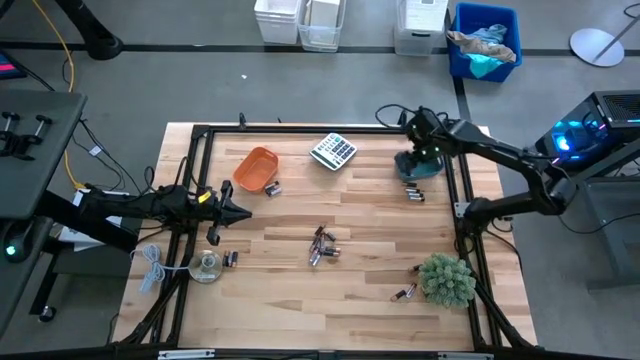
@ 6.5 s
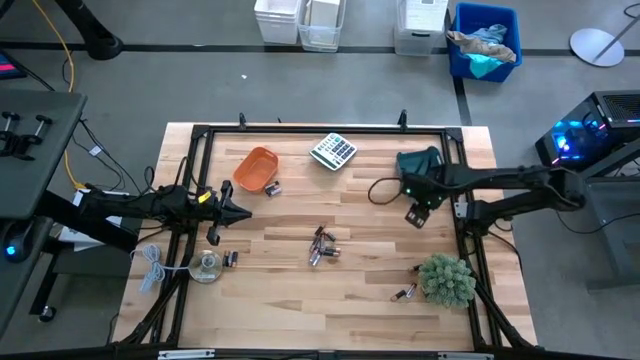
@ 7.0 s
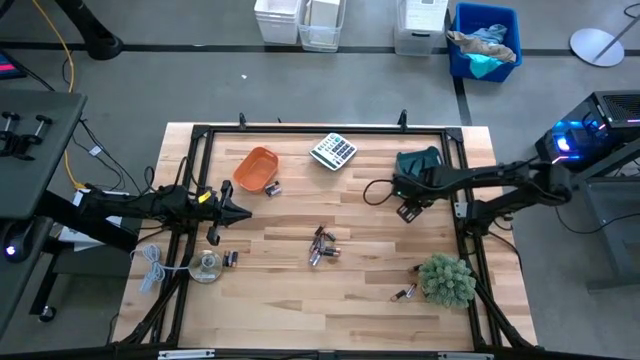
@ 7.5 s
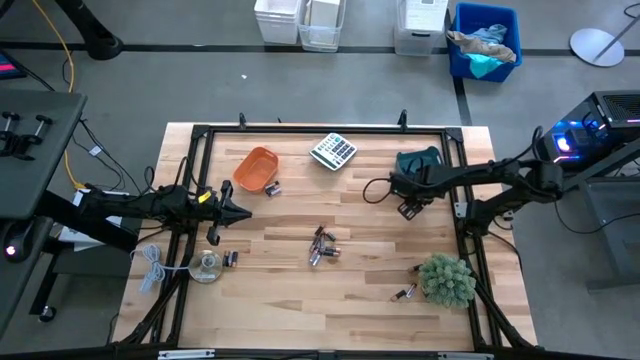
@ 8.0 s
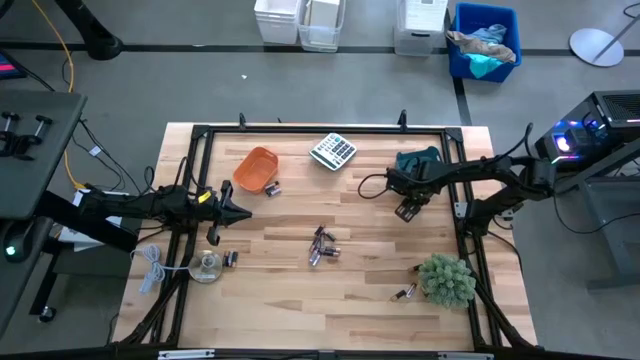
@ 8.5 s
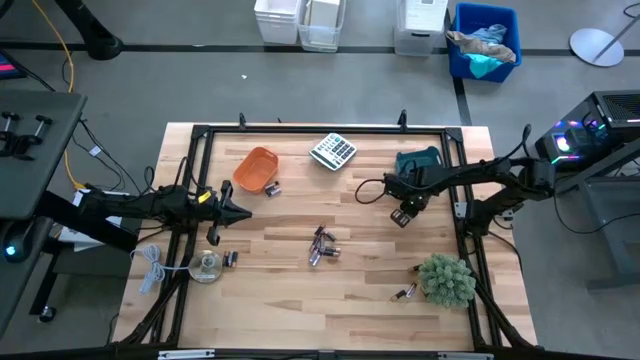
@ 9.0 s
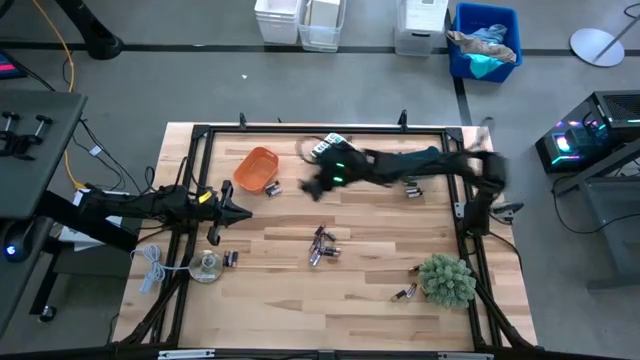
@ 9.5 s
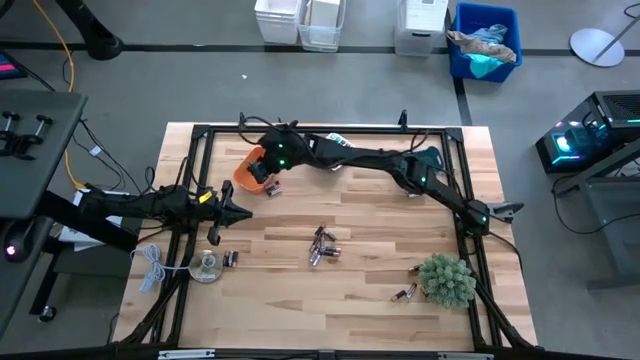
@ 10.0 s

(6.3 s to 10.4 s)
Task: Sort batteries
Put the silver battery into the orange bin

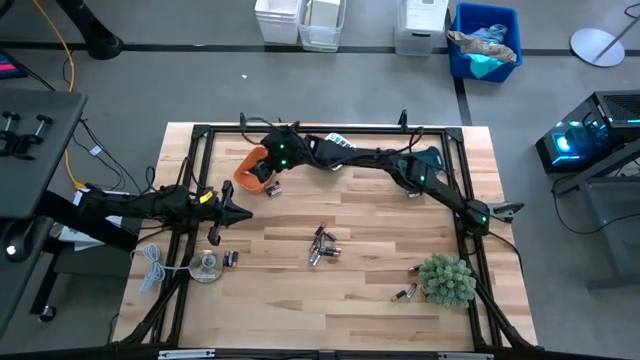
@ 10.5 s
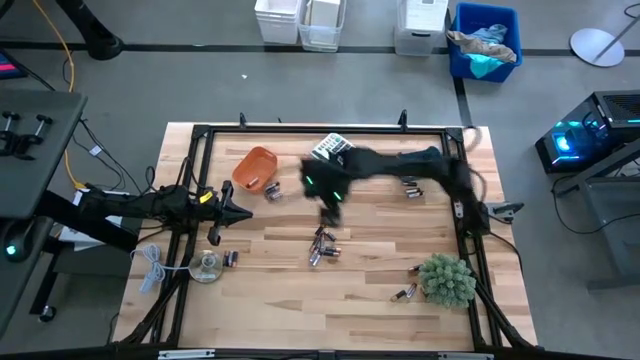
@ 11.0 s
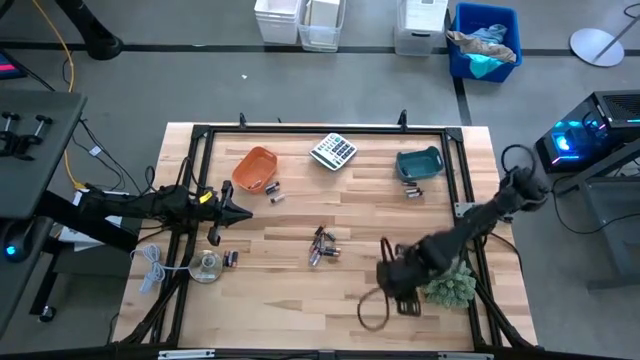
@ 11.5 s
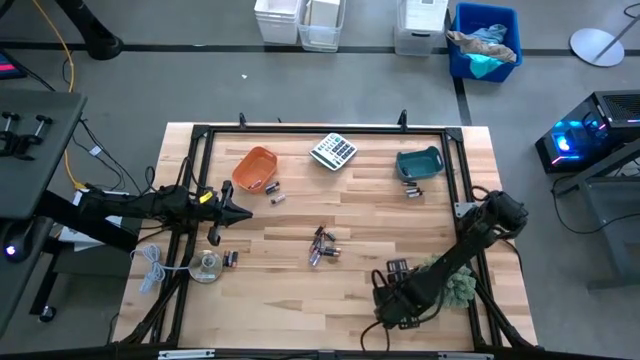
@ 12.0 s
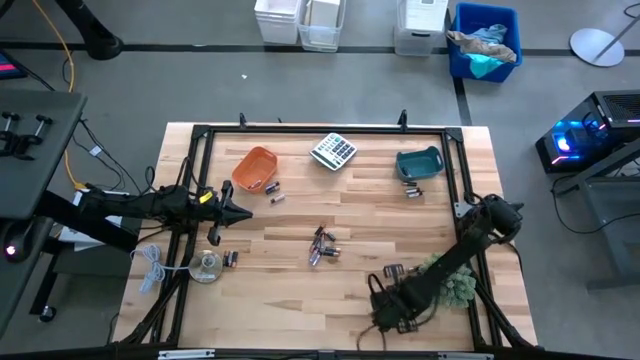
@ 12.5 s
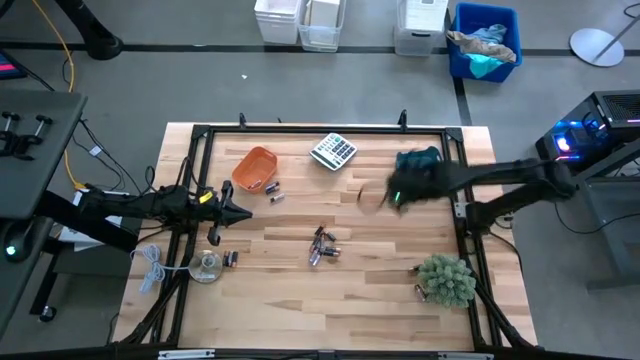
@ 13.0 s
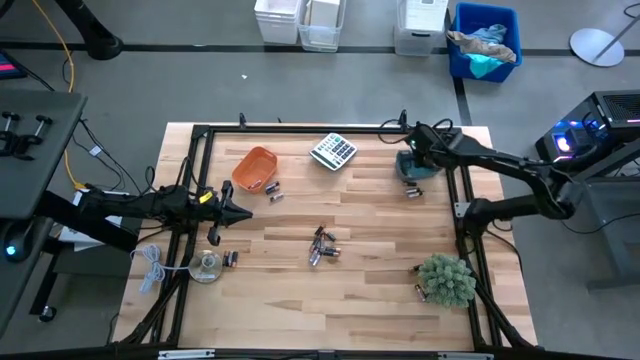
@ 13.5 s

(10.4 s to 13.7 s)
Put the golden battery into the blue bin

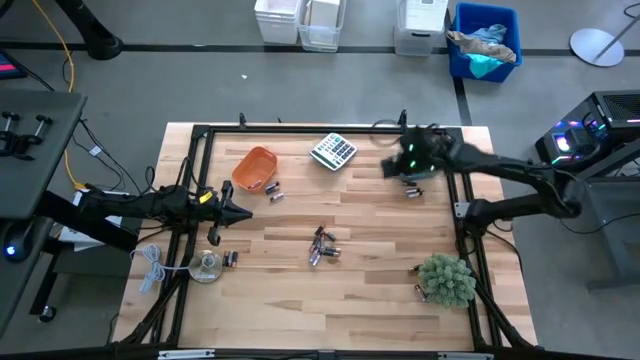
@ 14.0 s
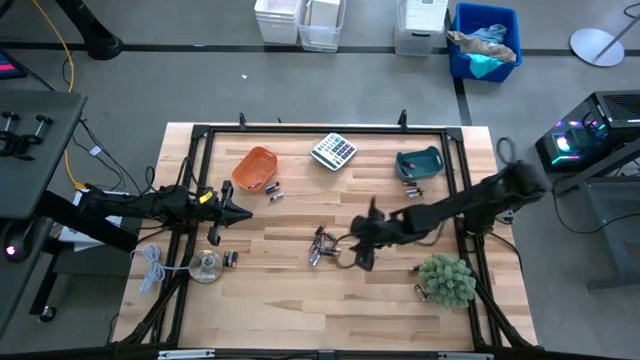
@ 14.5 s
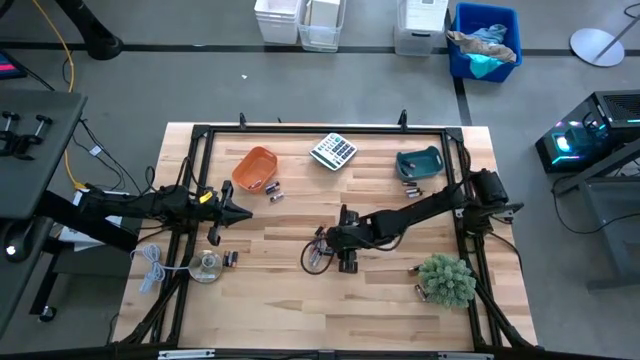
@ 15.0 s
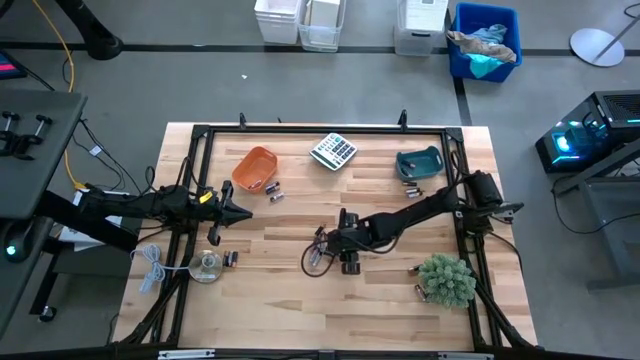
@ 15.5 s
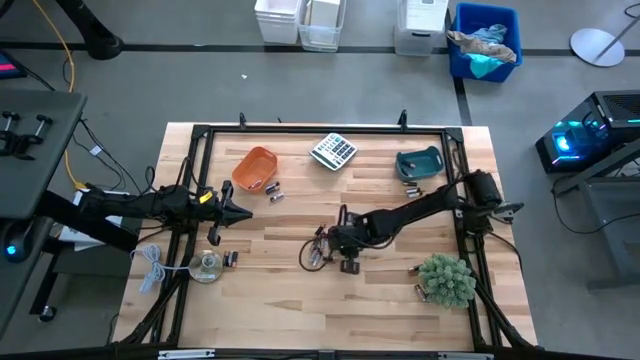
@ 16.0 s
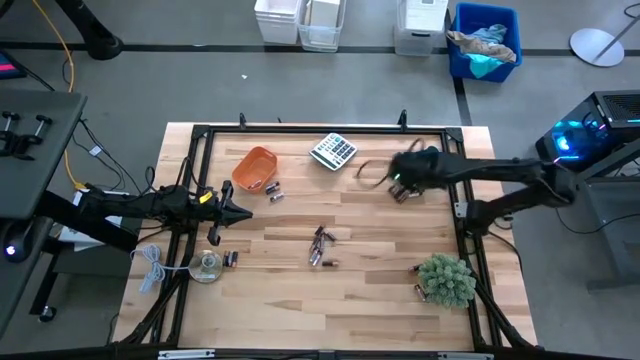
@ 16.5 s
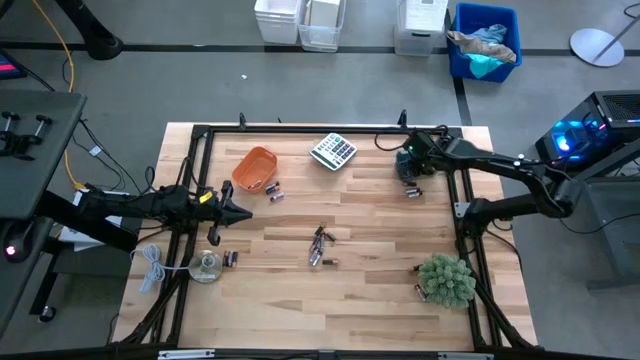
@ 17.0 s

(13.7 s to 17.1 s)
Put the golden battery into the blue bin

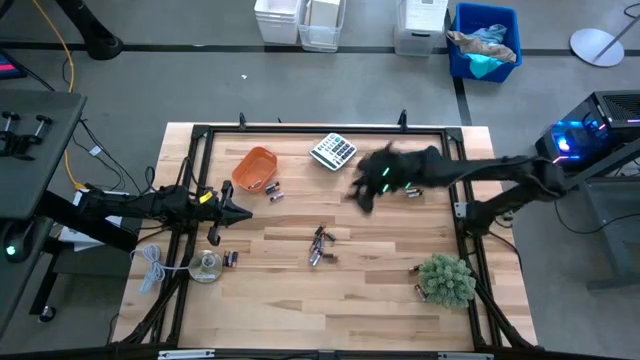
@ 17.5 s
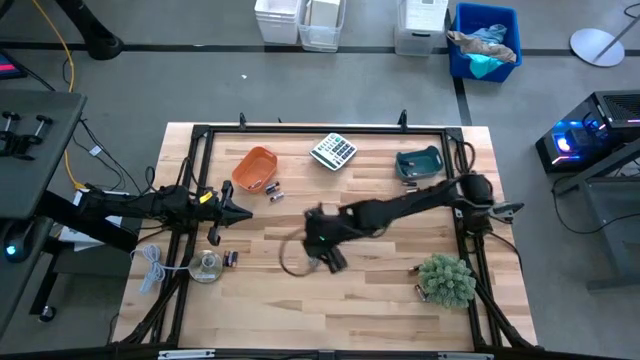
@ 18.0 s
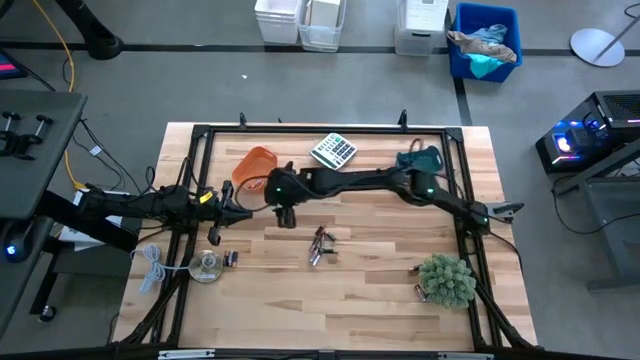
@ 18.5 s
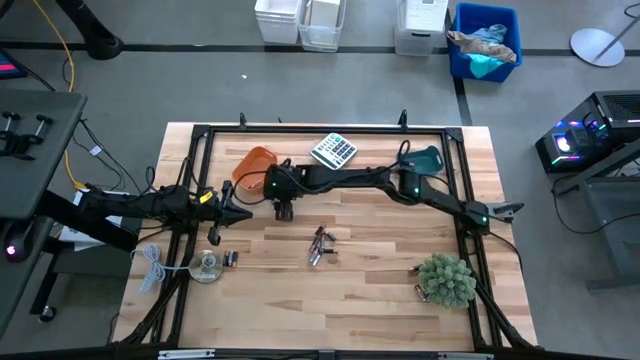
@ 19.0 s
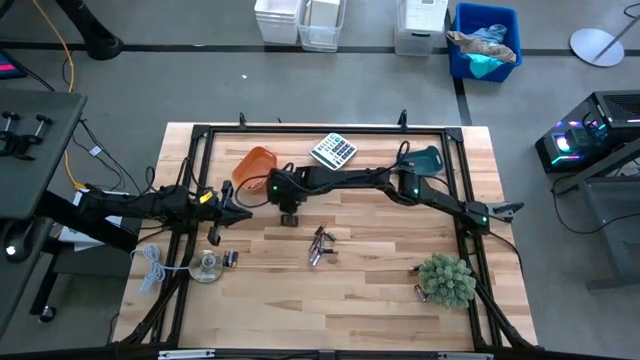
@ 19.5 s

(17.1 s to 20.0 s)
Put the silver battery into the orange bin

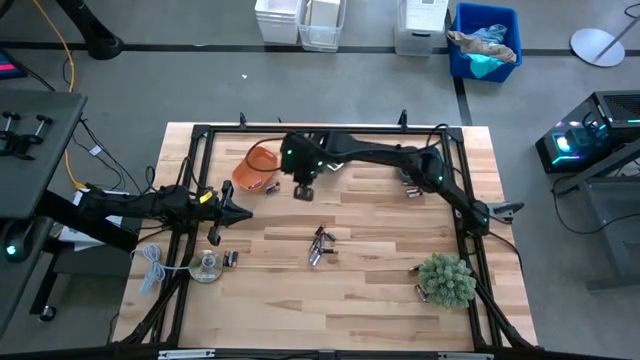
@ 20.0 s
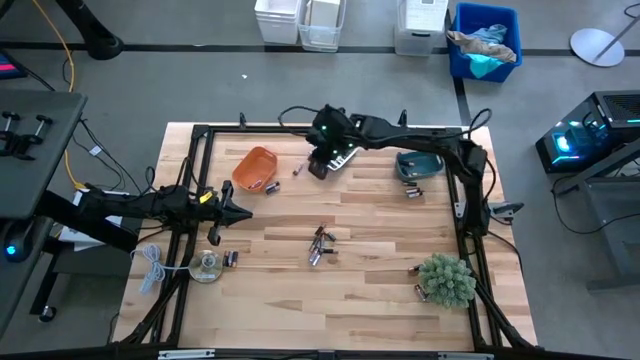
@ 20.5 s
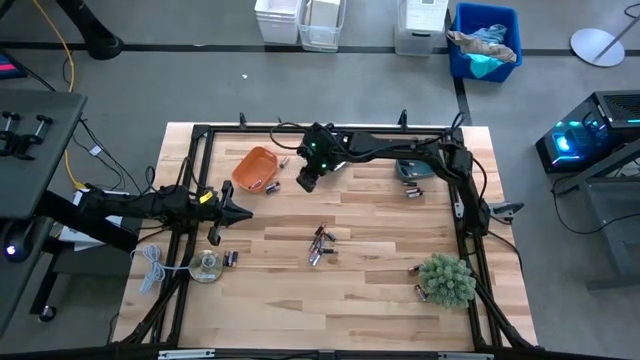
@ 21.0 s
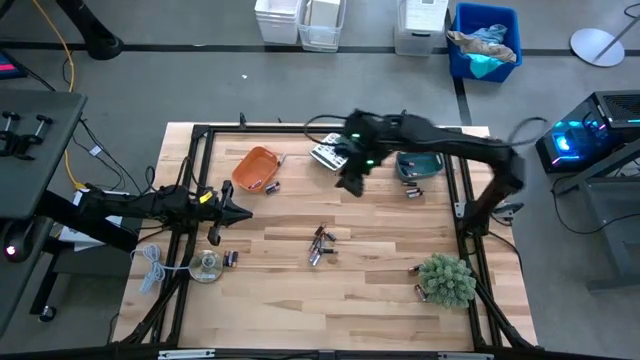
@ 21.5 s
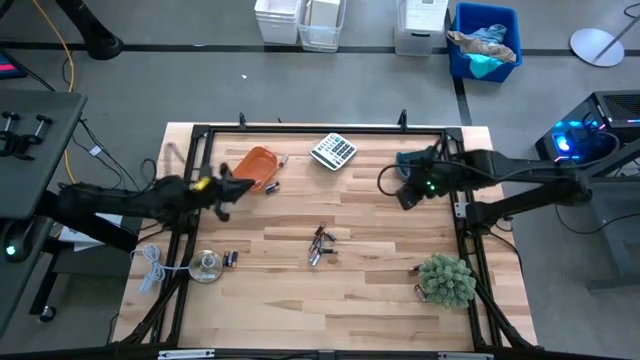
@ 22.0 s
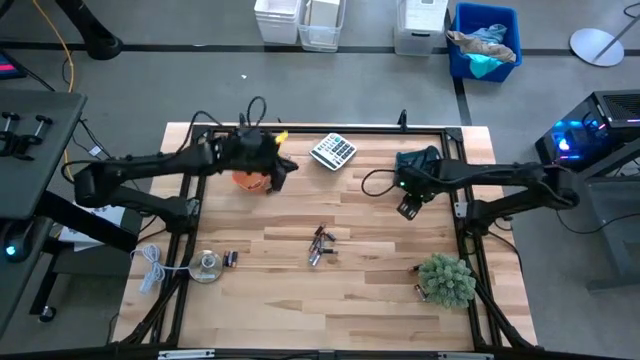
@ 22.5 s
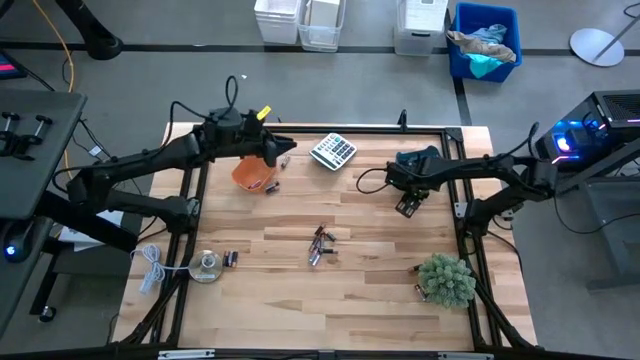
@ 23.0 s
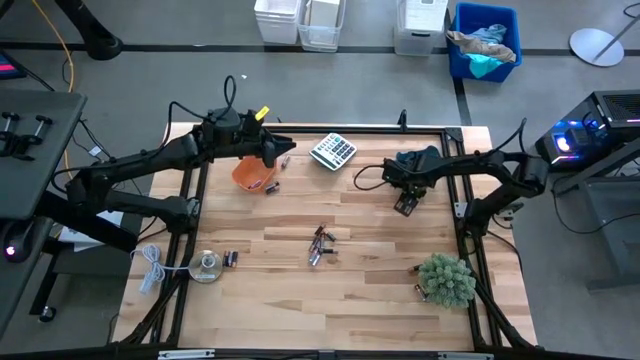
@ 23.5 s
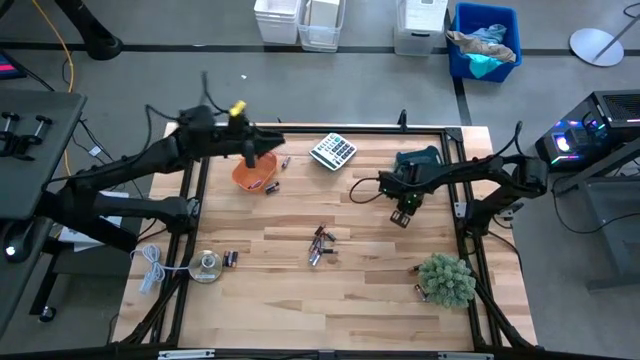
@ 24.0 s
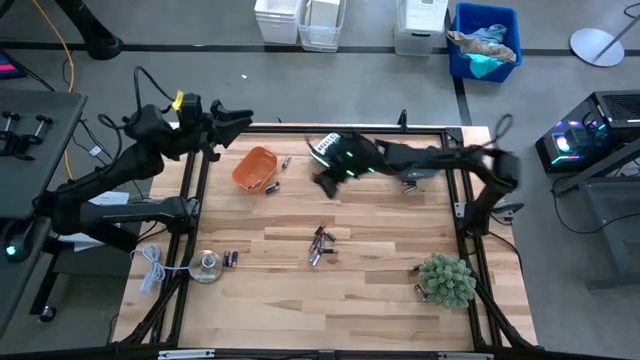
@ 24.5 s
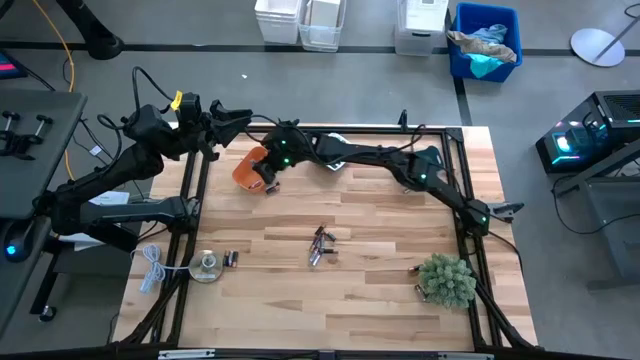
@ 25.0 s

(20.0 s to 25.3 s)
Put the silver battery into the orange bin

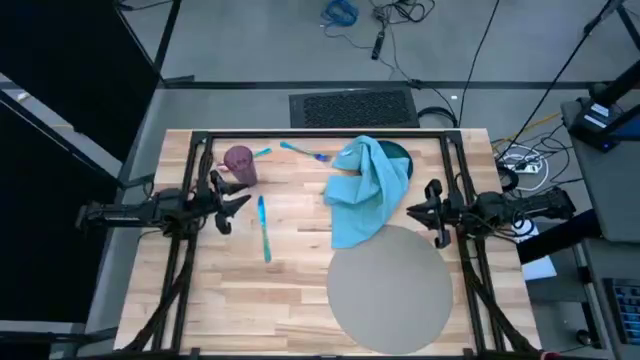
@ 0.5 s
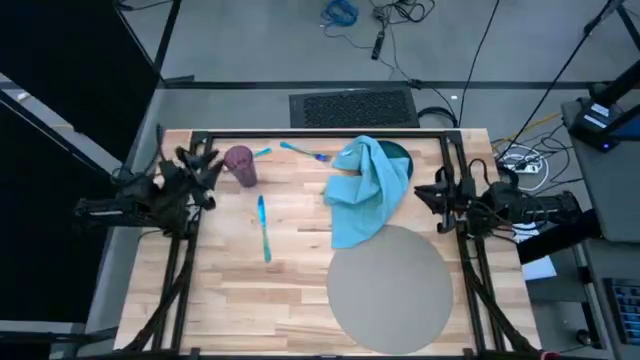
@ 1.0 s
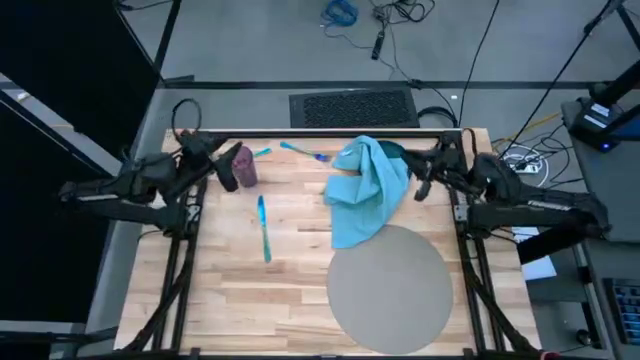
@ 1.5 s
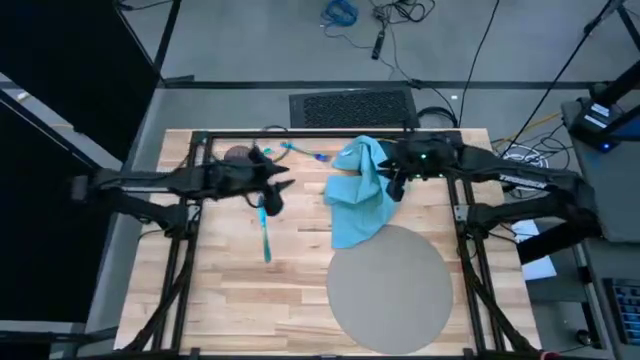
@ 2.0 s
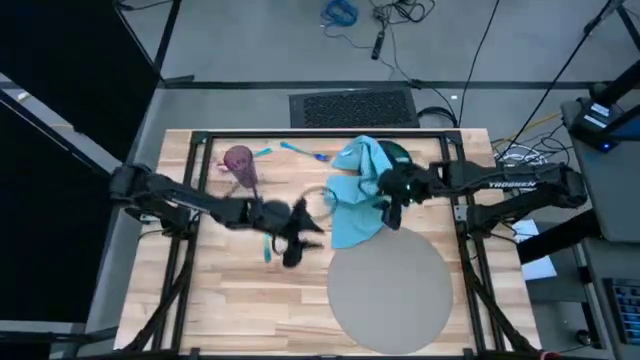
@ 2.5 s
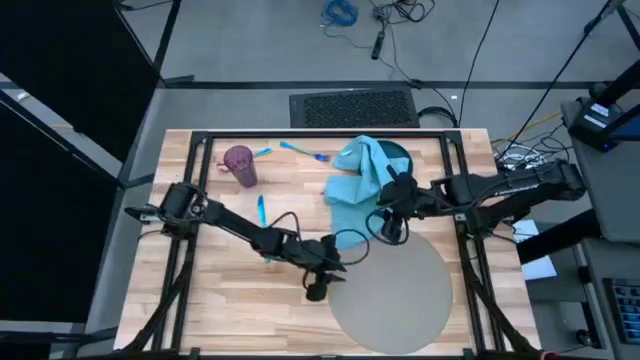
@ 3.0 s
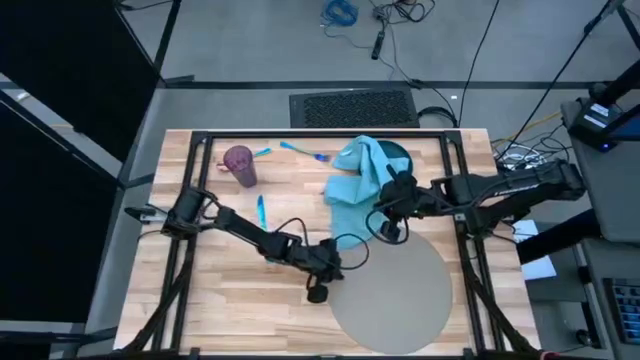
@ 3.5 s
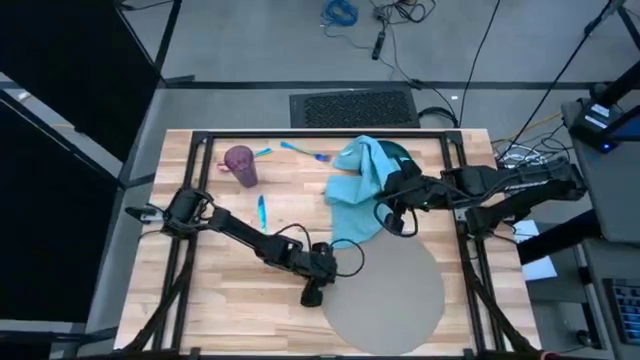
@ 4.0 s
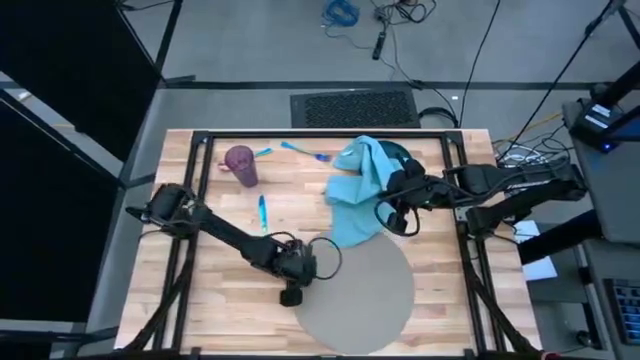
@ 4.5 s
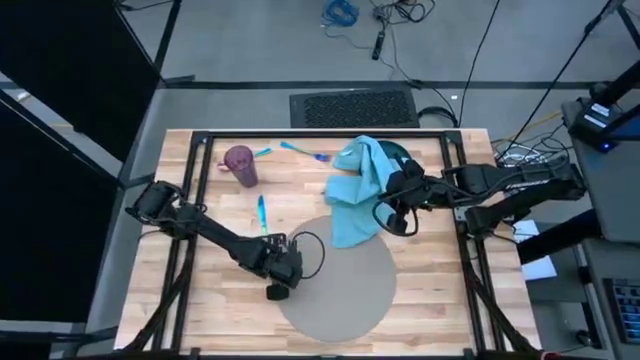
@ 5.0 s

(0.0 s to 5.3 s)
Task: Set table place
Move the gray mat to the center of the table
